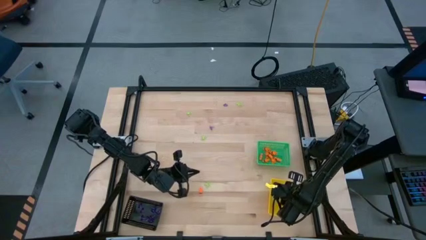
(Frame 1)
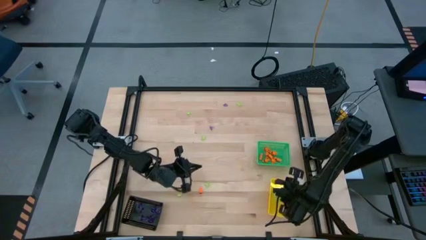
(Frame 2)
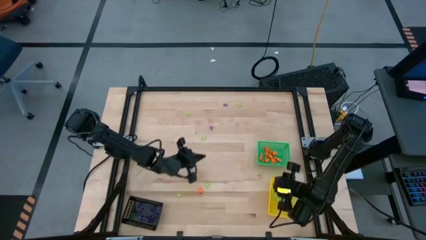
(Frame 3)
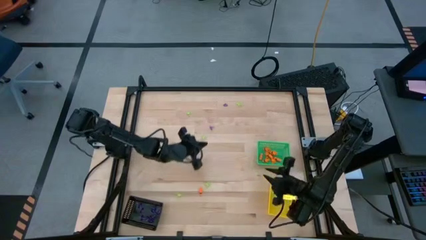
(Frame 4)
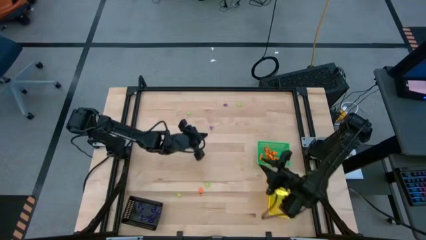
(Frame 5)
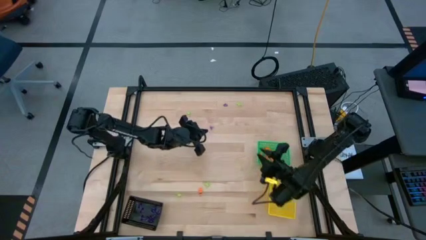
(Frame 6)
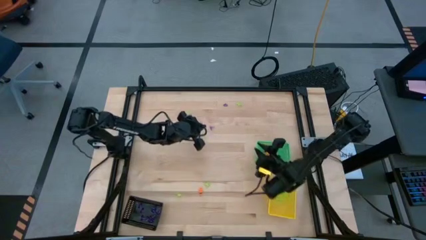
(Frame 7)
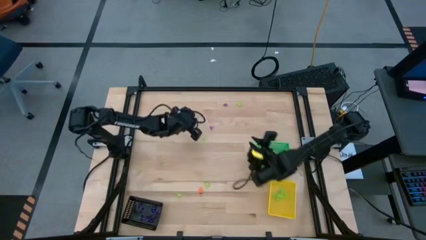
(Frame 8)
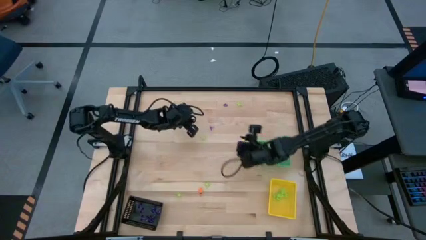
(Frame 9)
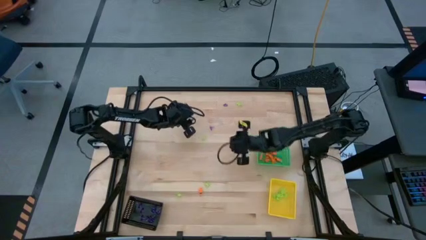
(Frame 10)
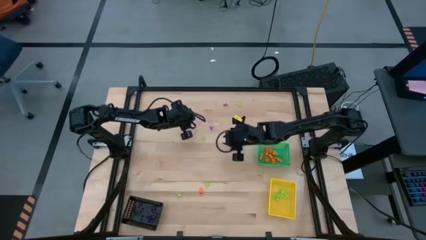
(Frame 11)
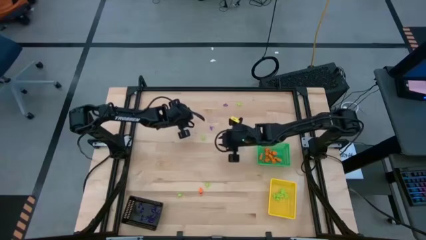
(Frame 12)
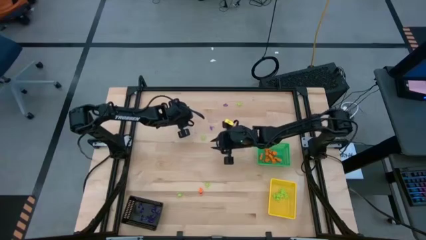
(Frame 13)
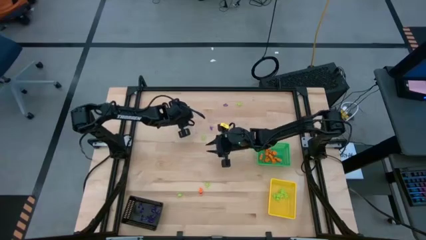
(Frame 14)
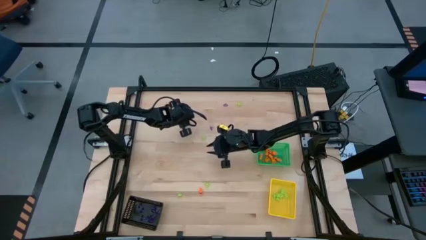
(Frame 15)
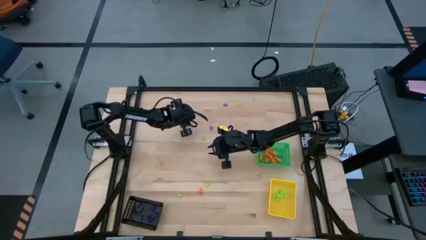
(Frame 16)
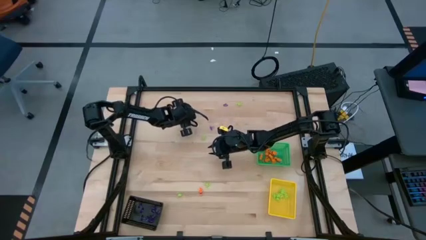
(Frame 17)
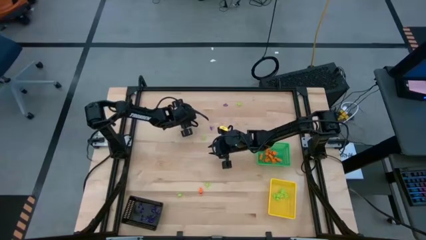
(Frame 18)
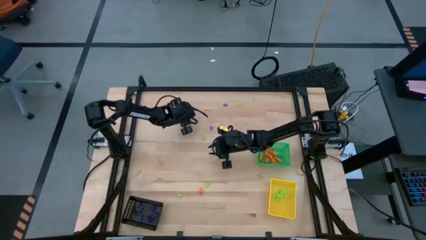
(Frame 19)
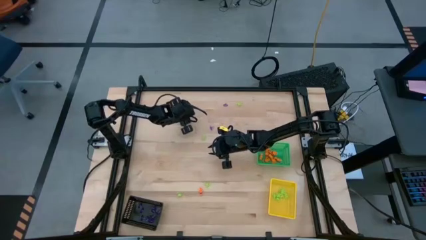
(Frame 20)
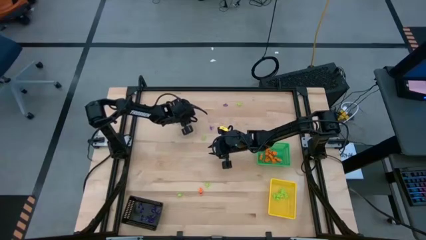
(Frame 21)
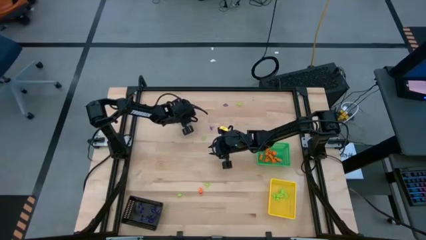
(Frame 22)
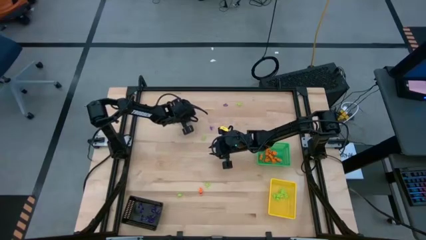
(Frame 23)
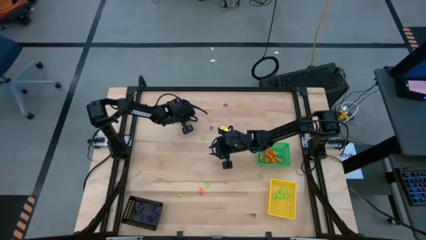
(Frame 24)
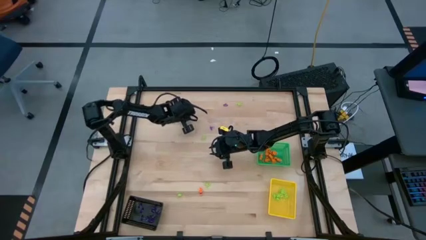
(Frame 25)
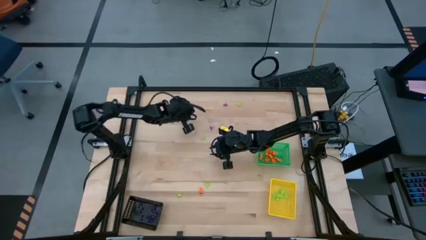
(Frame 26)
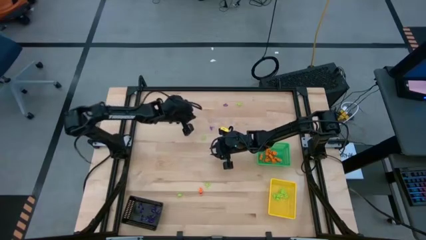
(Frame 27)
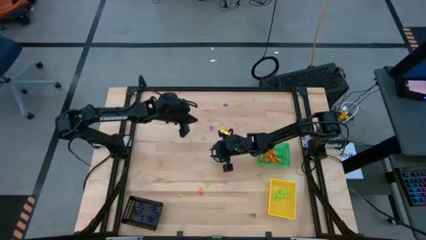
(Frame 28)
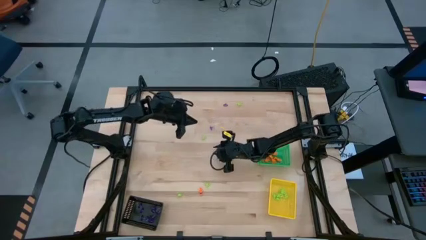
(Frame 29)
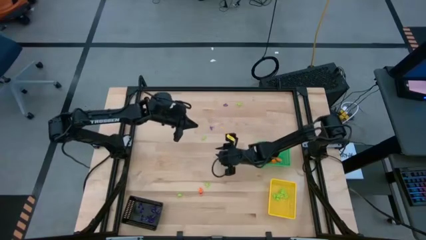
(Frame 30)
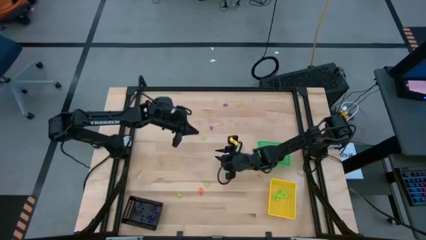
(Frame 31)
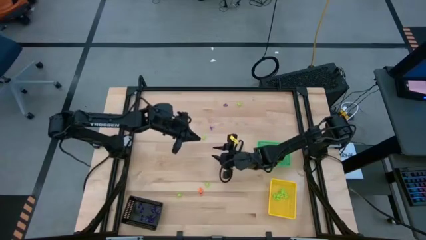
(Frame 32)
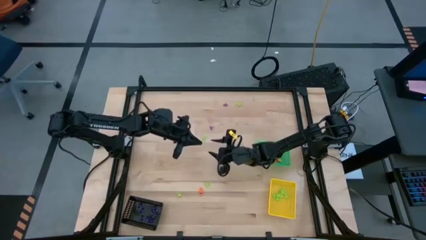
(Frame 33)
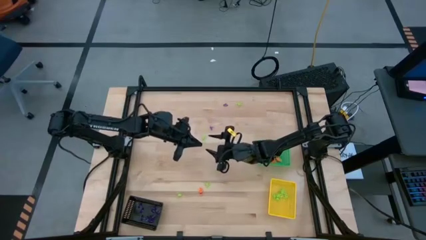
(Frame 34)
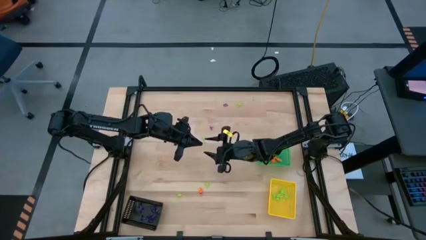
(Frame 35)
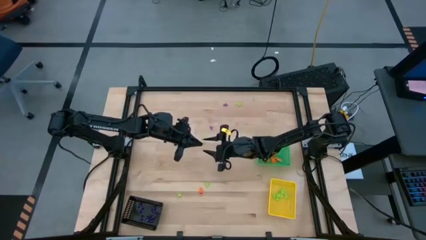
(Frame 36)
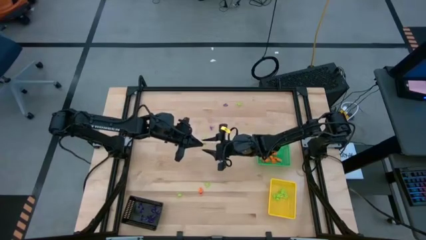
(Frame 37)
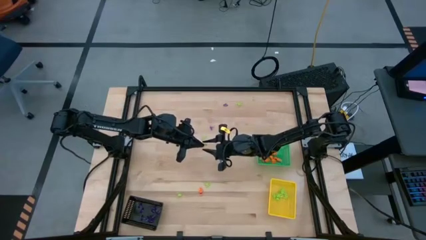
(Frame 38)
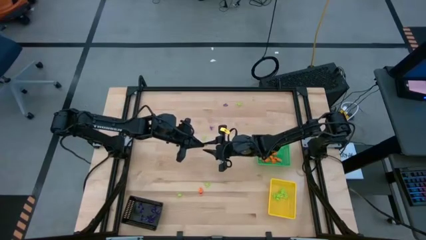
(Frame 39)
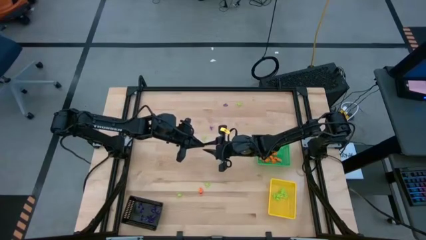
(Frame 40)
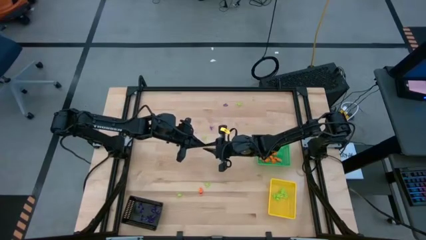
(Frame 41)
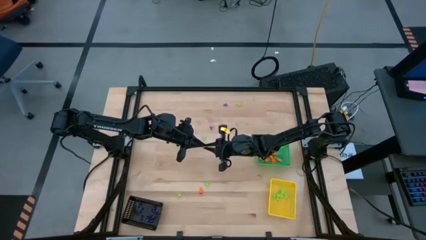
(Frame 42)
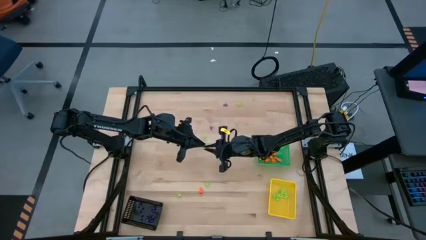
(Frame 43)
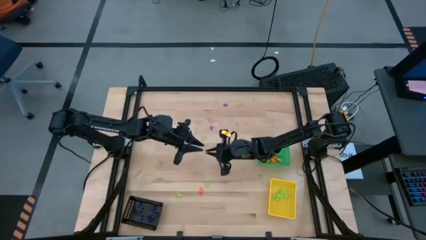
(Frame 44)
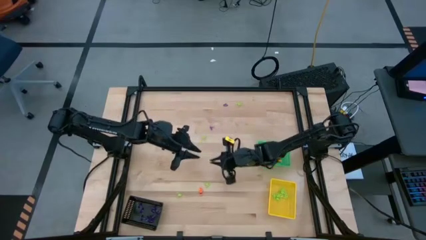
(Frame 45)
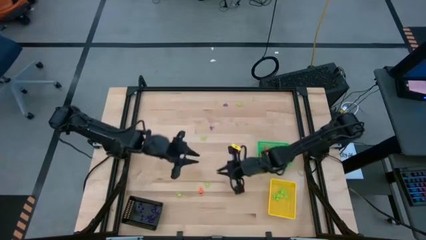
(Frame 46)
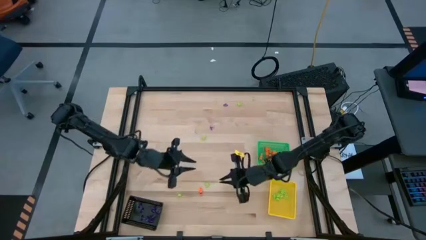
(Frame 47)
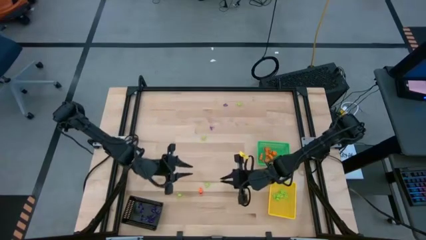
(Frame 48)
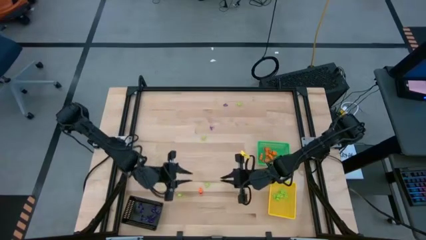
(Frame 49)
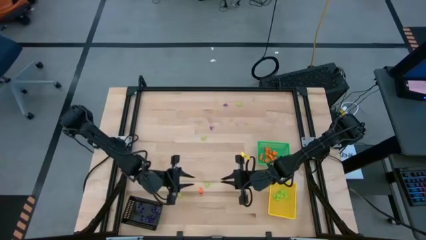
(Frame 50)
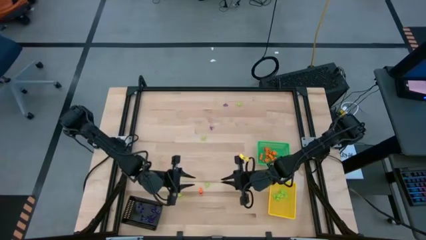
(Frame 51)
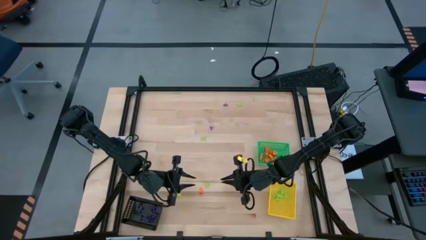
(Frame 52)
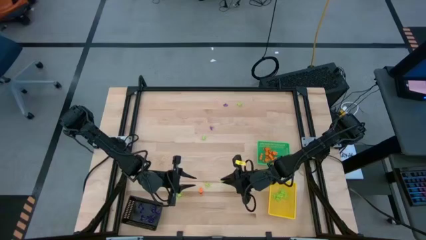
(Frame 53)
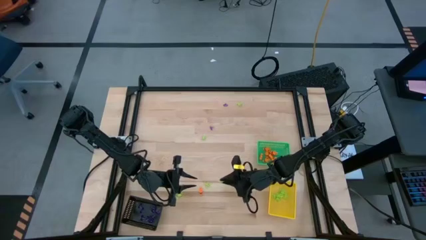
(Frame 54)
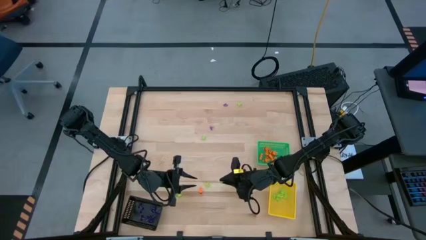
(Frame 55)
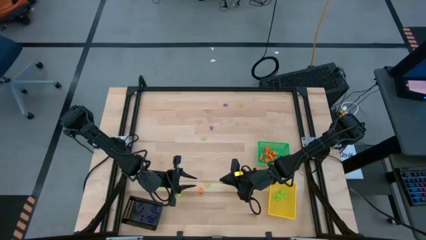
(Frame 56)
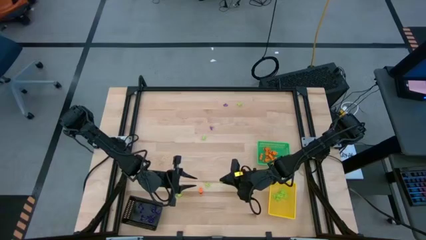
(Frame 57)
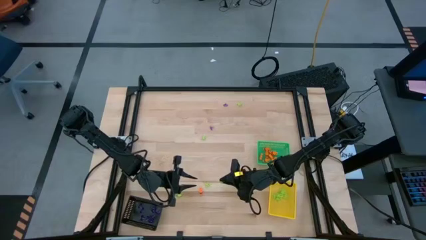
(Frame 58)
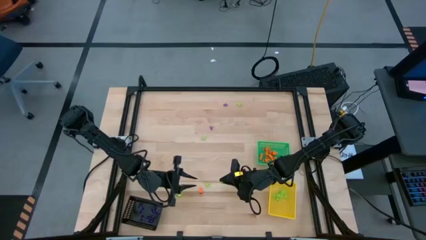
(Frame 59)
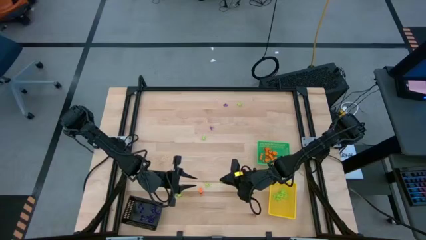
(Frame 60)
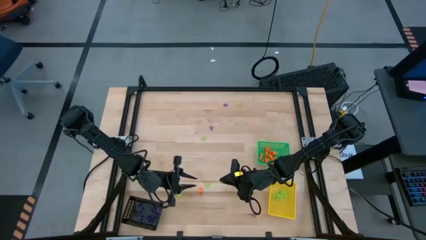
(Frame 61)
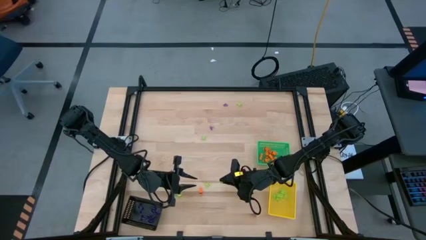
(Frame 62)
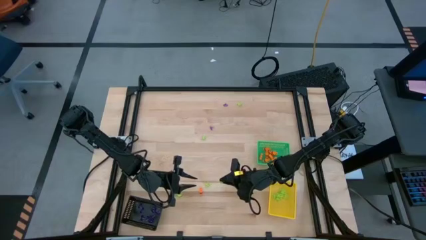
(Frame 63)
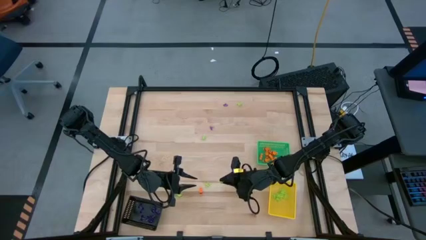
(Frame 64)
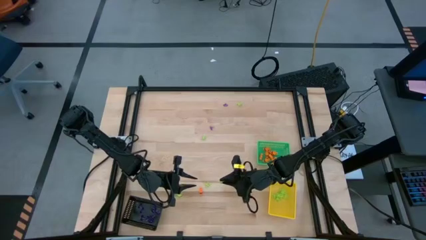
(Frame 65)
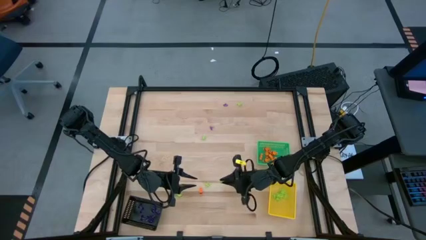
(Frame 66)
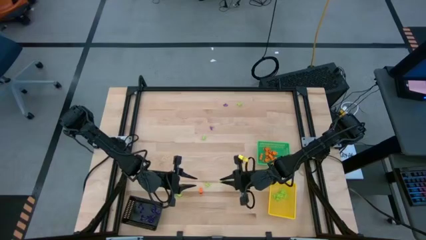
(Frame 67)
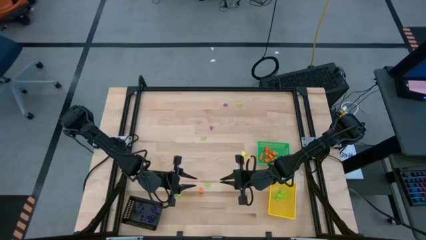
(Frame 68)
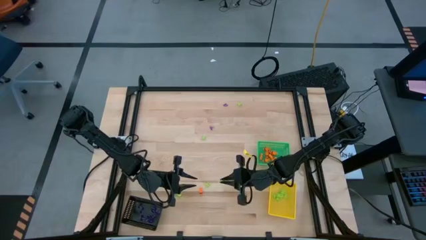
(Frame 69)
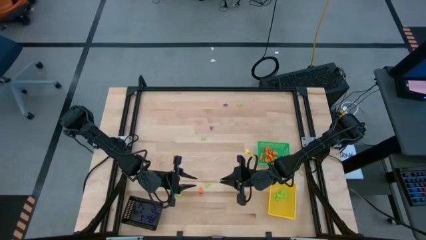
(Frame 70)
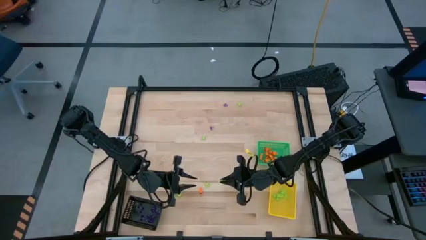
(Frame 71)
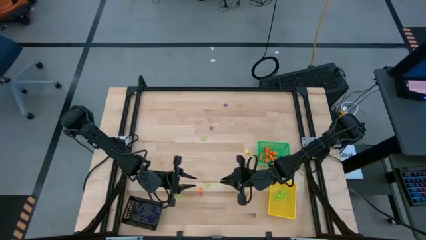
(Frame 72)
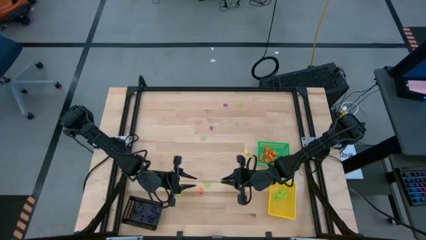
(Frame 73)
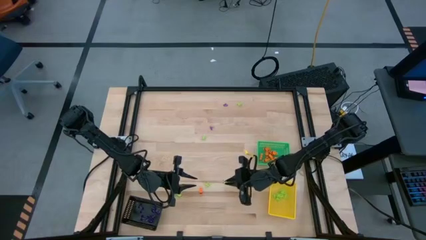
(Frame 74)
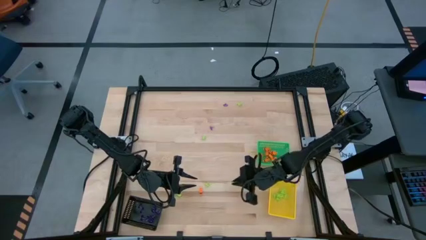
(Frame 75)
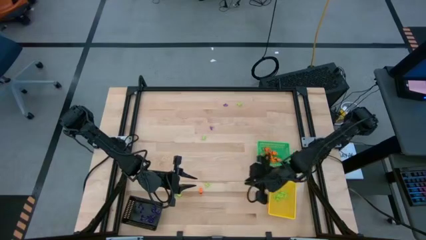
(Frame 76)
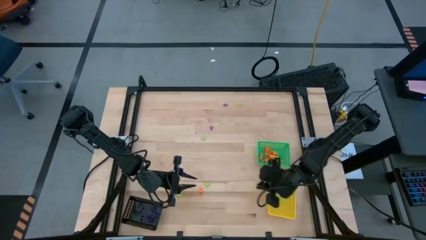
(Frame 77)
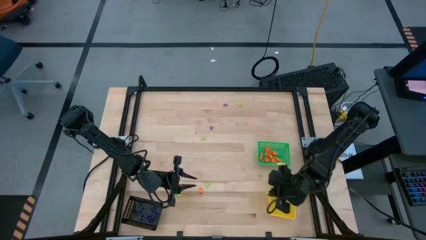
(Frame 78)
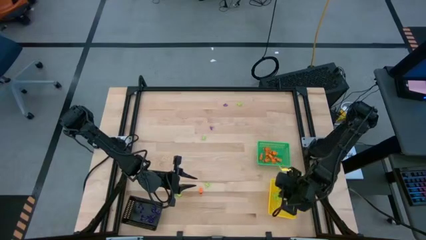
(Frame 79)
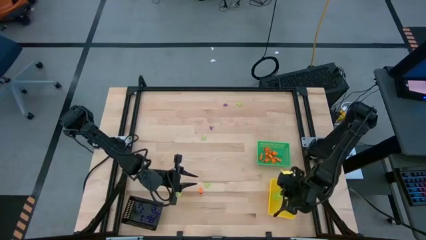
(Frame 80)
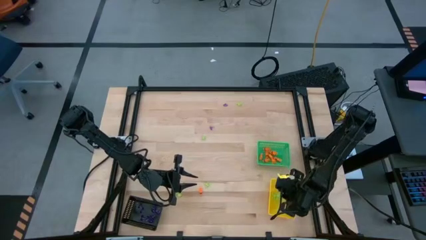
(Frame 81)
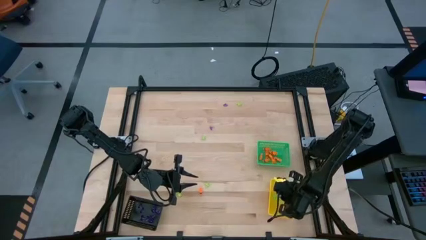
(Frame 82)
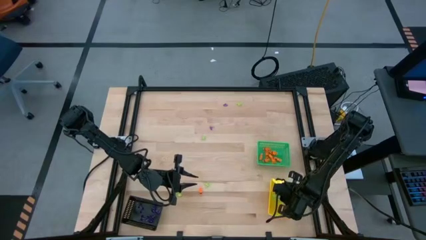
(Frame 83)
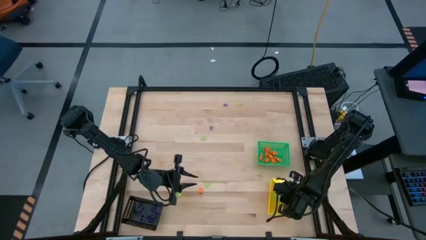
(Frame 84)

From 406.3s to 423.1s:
Task: Sort Halloween decoration
Put the green spider toy into the yellow bin
